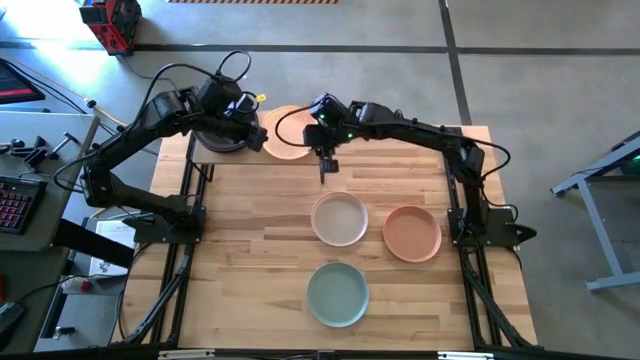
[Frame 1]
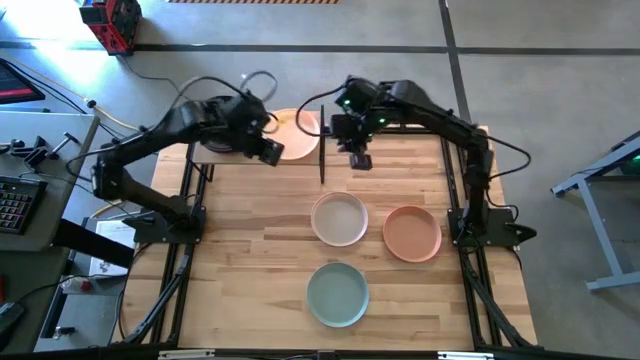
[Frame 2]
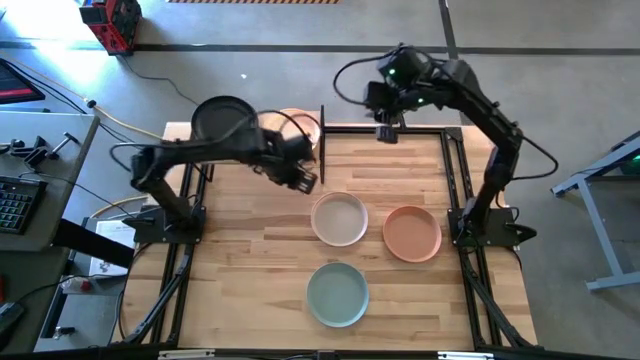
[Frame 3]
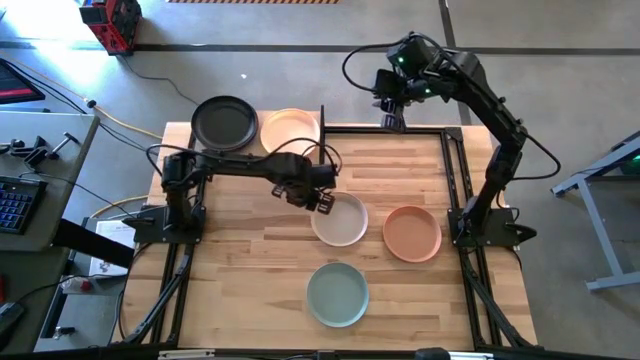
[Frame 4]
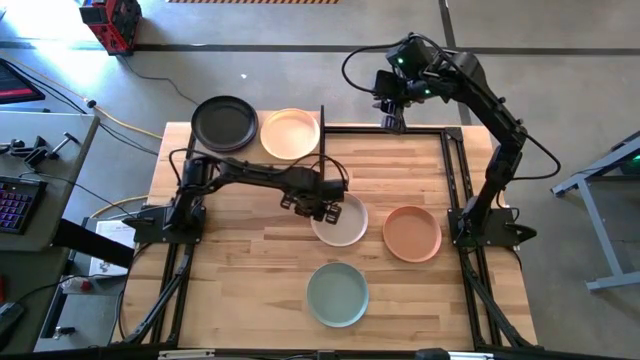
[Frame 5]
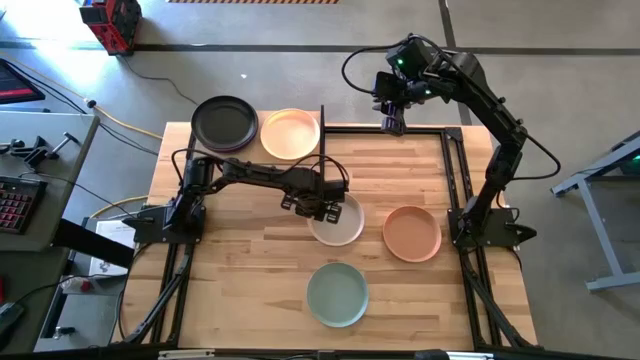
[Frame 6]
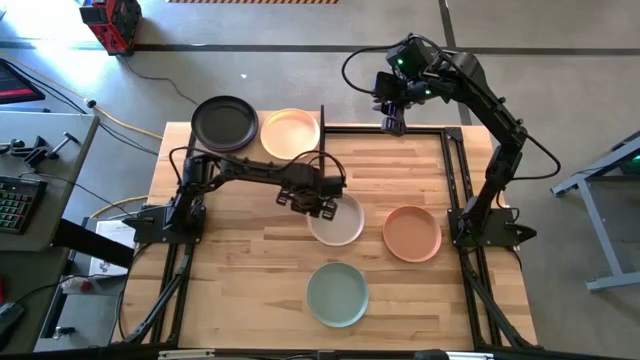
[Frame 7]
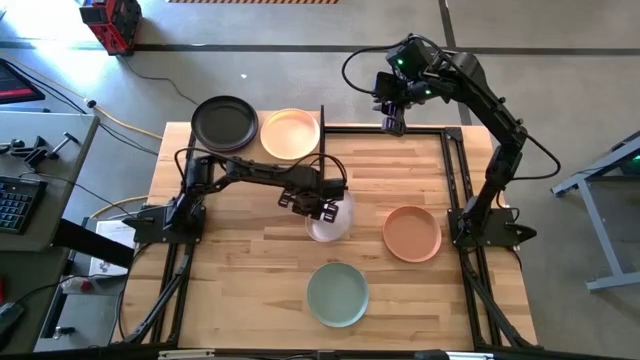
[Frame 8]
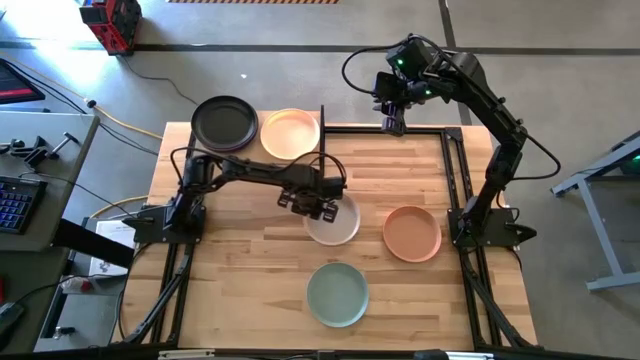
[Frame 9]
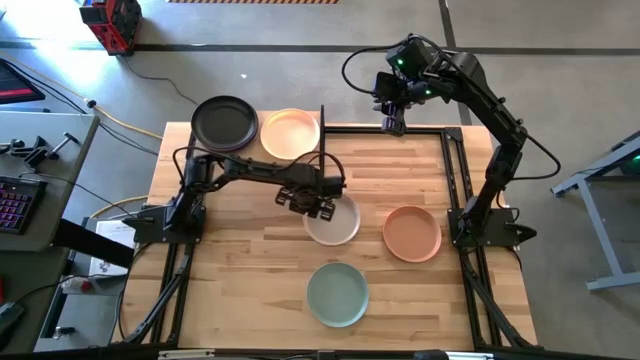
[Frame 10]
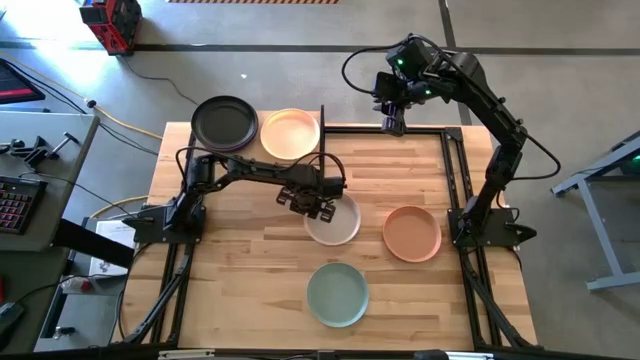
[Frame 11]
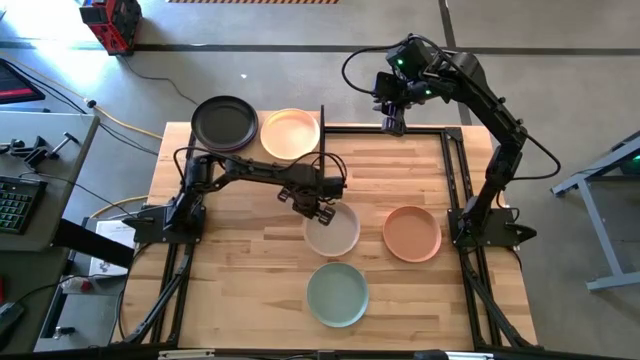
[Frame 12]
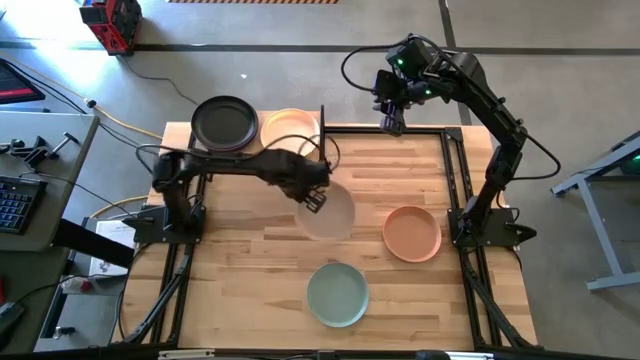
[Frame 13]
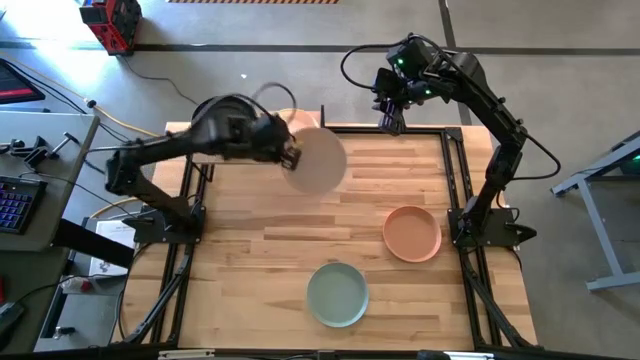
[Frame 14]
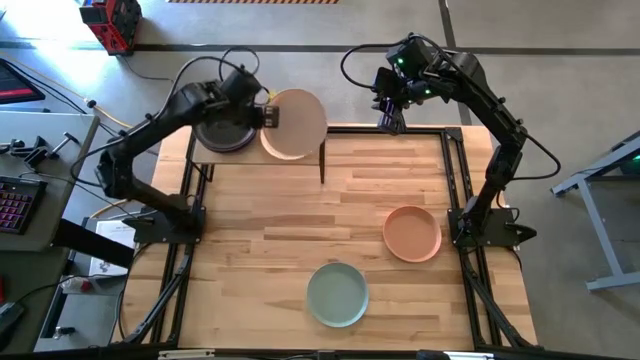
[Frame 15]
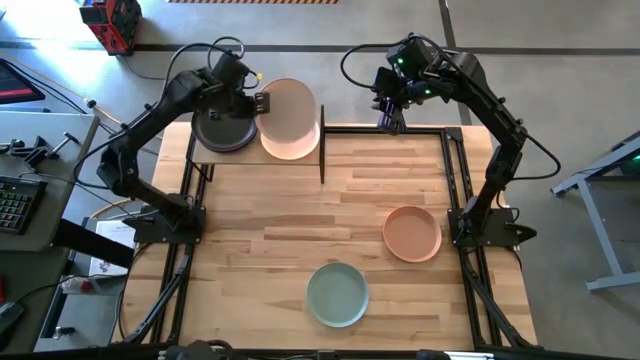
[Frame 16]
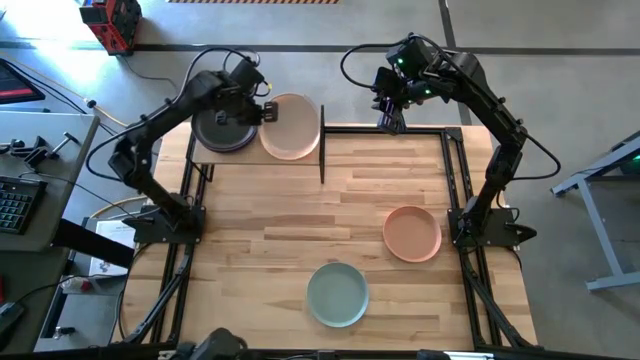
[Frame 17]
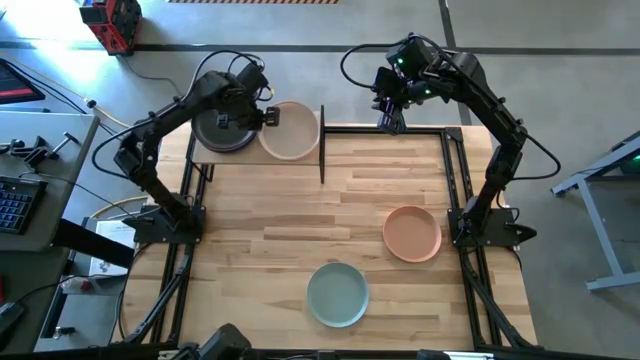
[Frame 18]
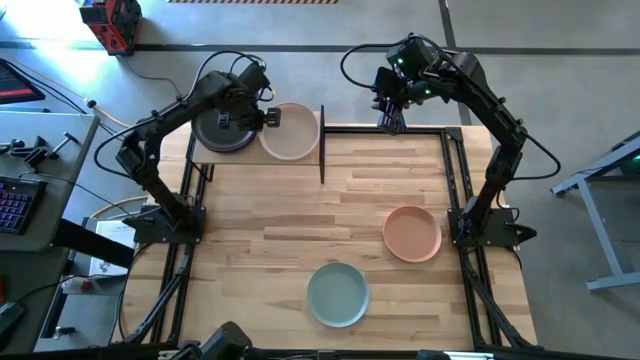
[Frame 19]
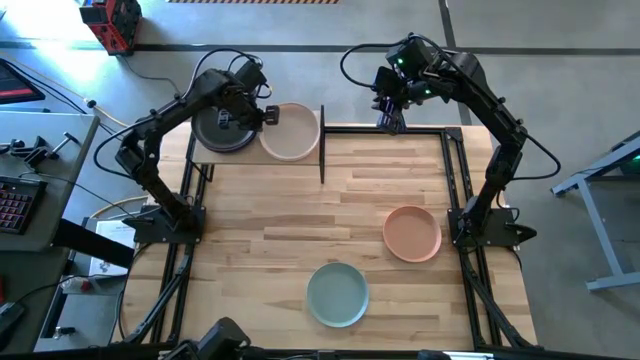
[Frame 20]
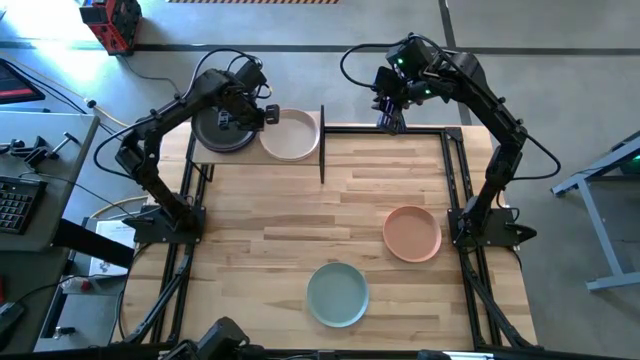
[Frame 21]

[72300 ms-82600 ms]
Task: Place and stack plates onto a shelf
Stack the white plate on top of the white plate on the shelf

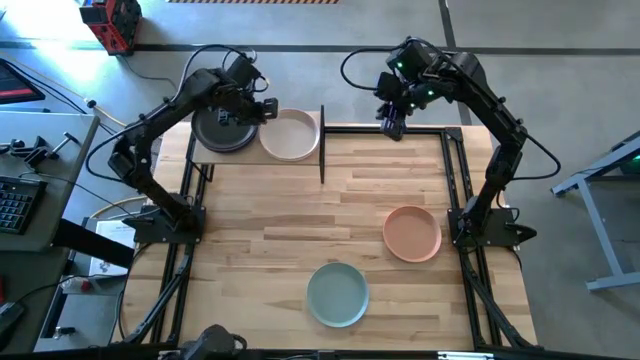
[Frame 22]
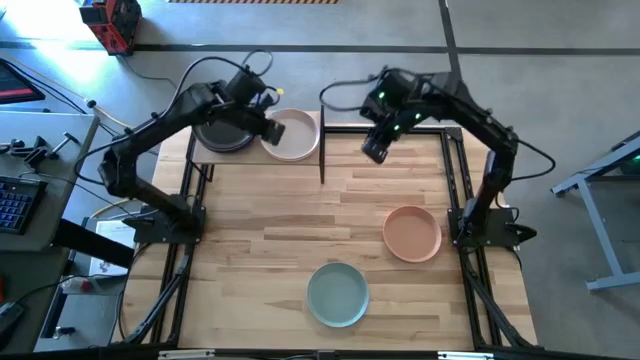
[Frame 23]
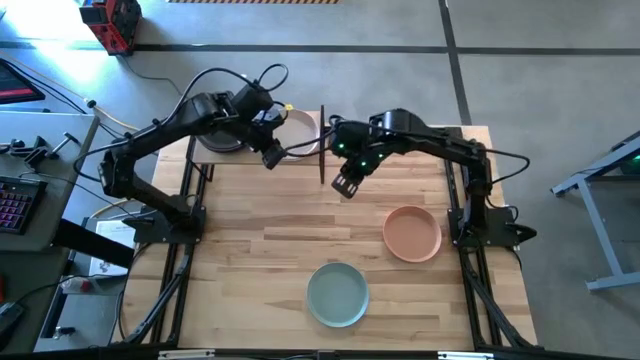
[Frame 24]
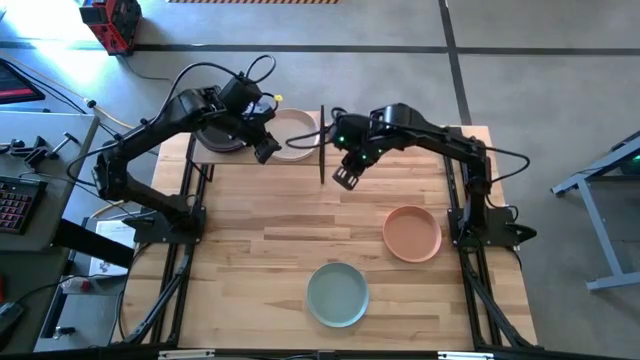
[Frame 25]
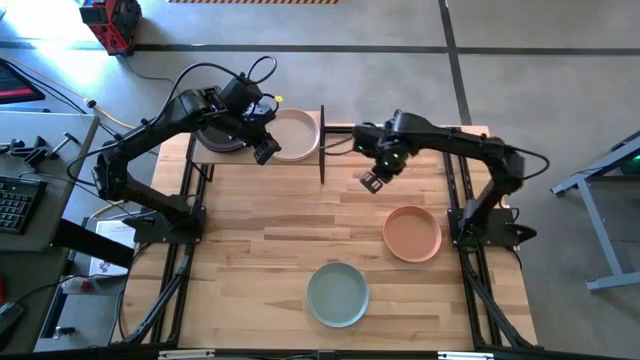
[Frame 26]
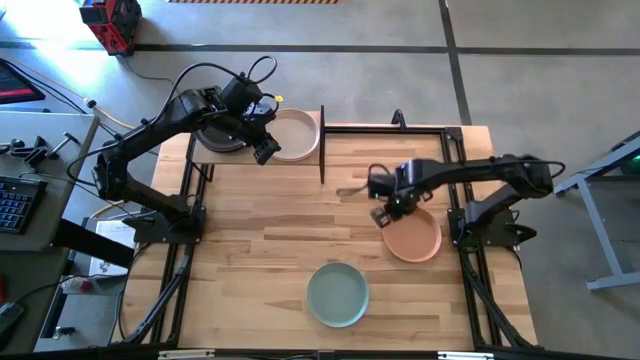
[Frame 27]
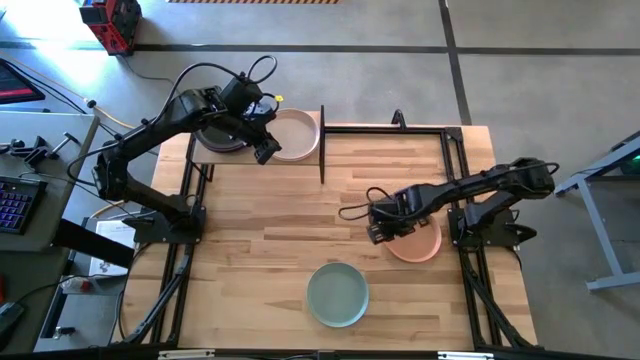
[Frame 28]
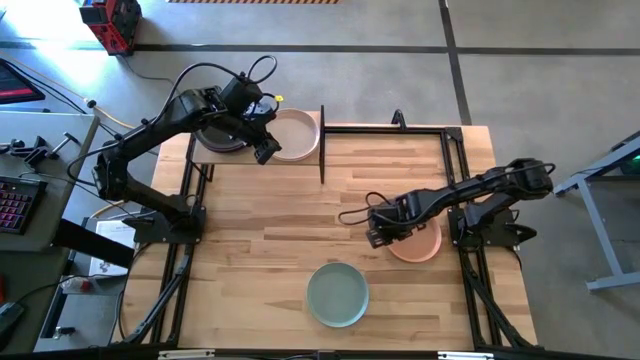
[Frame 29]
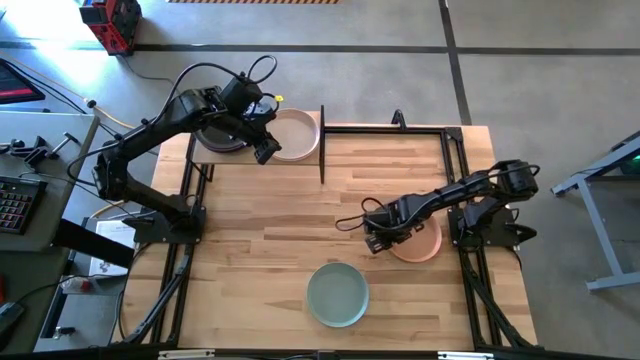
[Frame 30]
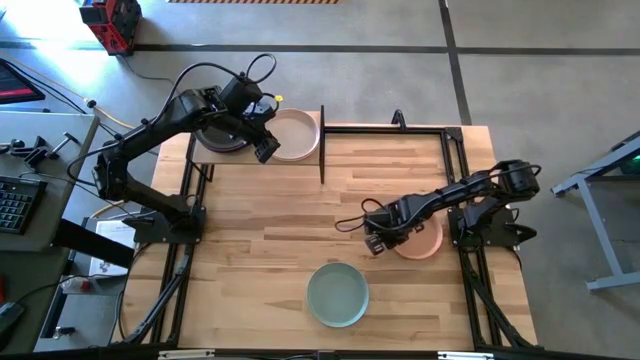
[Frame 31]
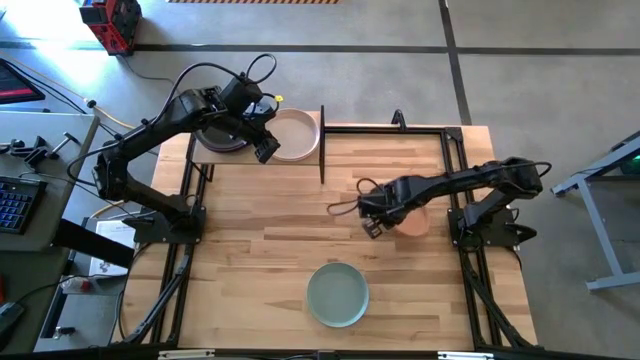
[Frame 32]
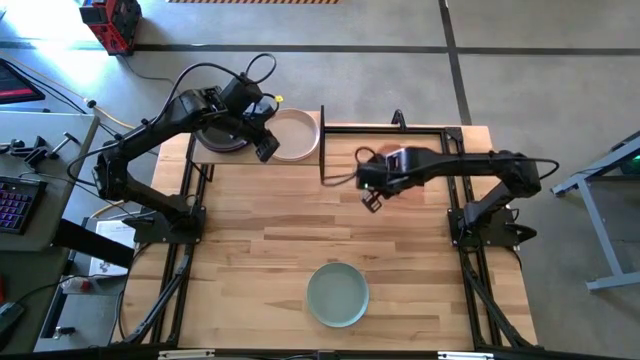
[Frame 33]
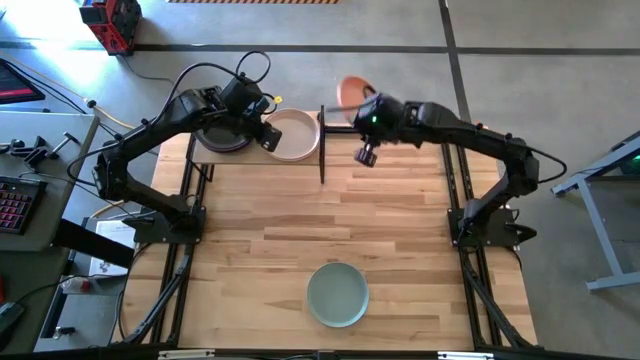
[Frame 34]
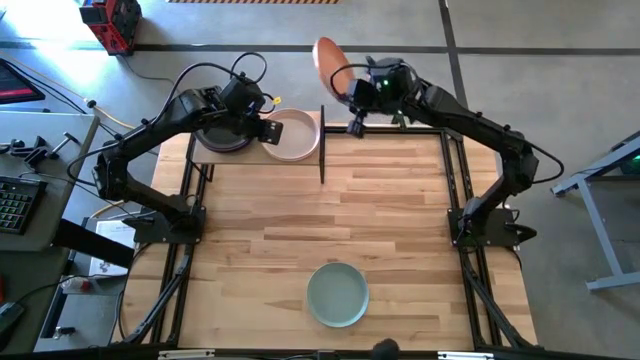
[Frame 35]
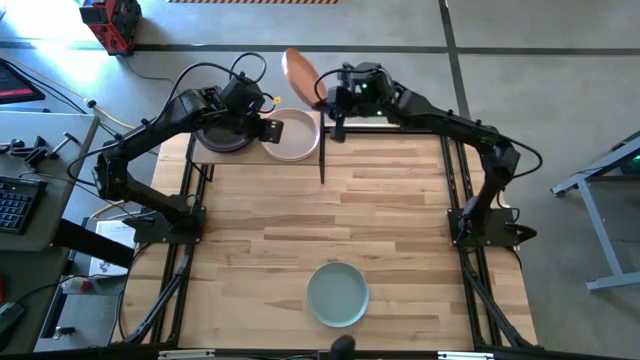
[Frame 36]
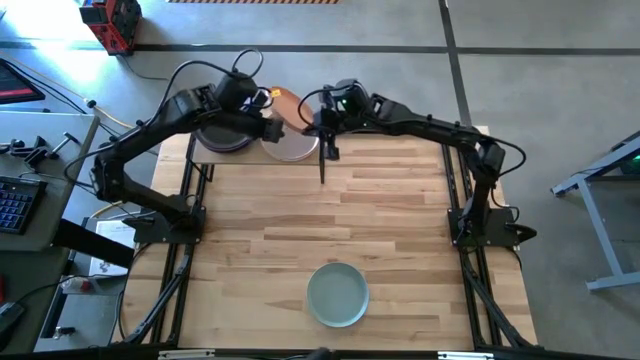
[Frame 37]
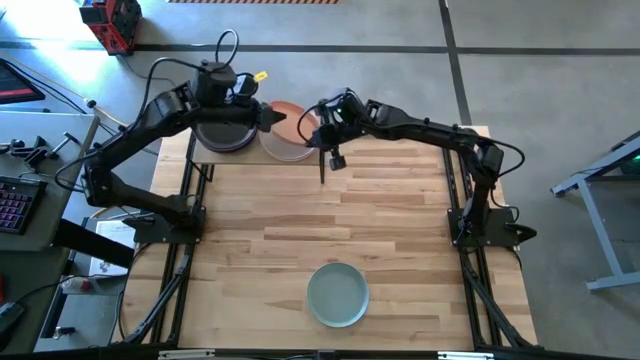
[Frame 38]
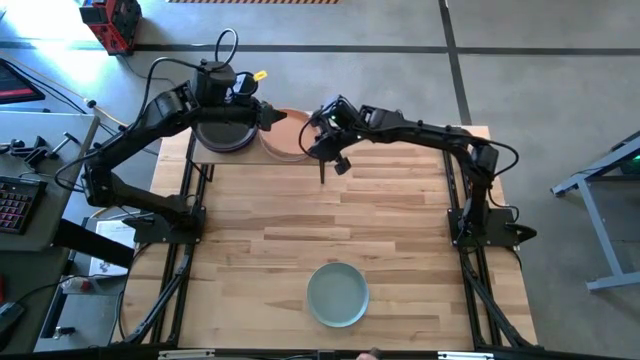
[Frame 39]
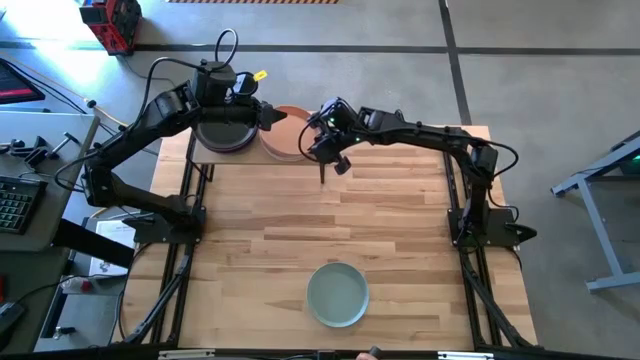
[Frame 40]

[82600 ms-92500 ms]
Stack the orange plate on top of the white plate on the shelf

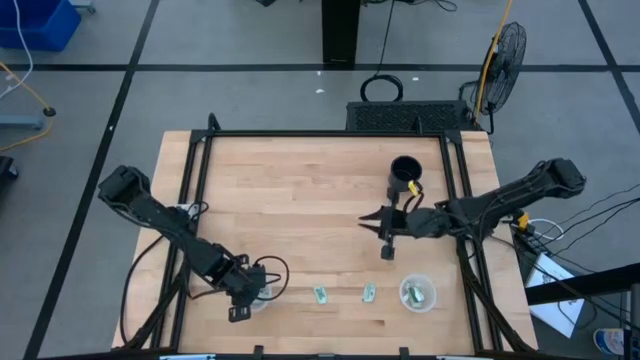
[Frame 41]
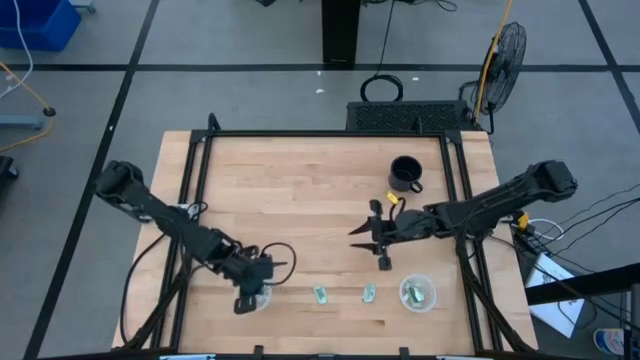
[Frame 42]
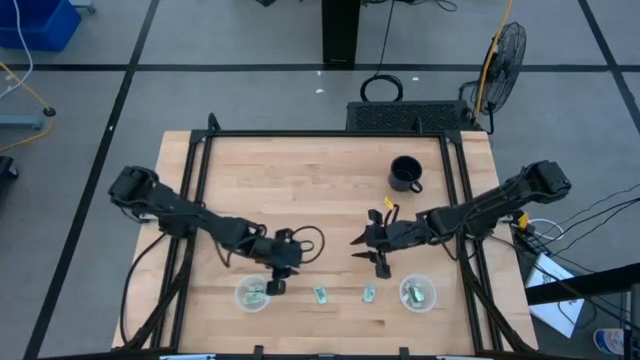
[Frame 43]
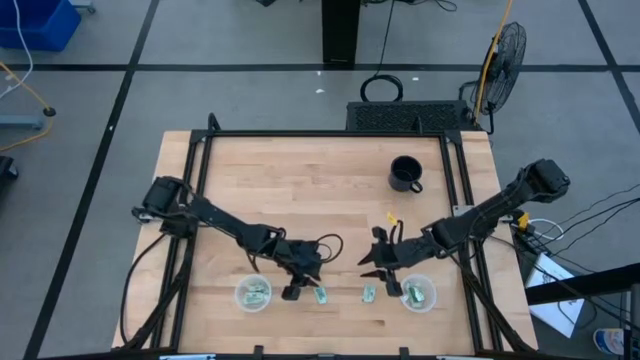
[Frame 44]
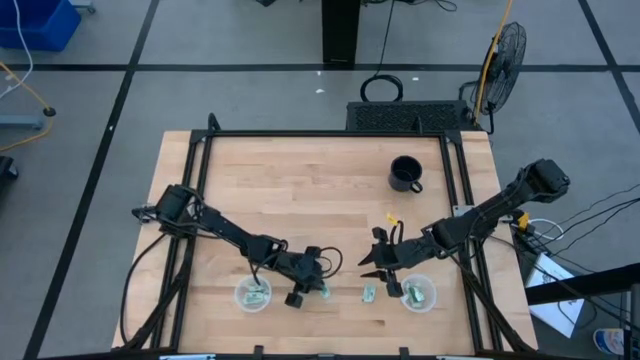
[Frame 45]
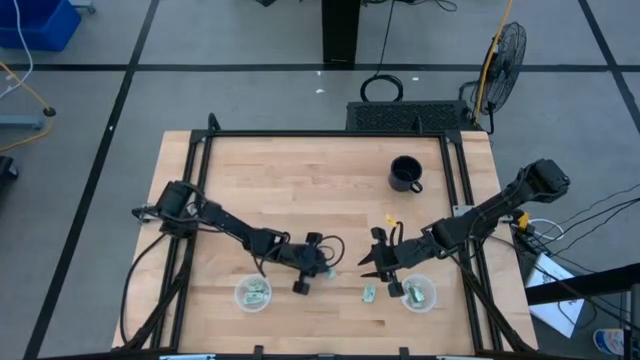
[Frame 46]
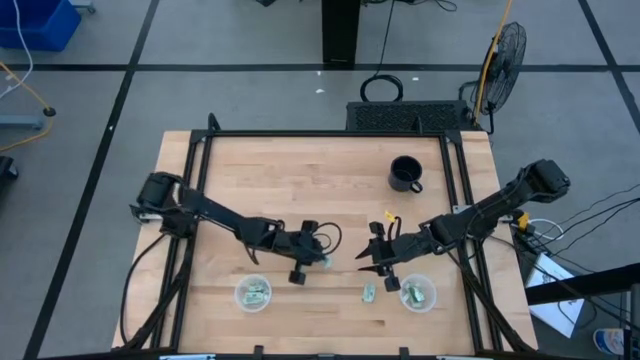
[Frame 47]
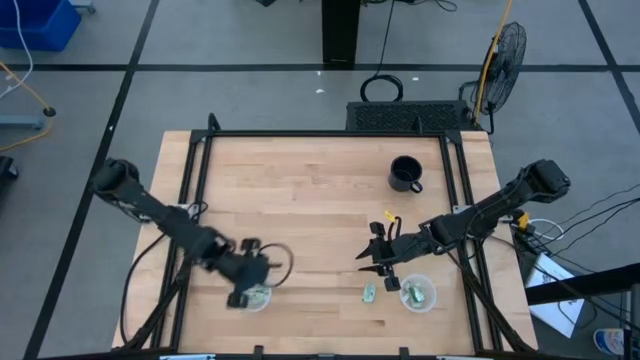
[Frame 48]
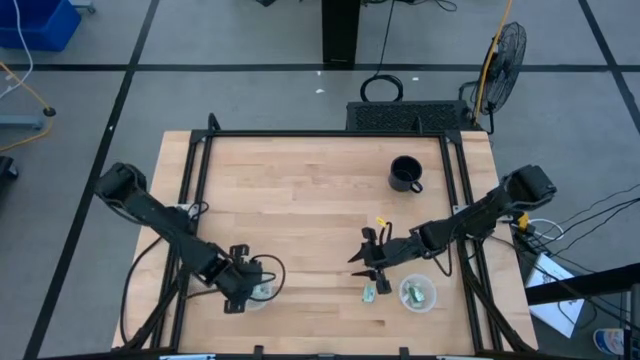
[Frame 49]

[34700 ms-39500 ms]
Task: Pick and place Stevia / Truvia into bins
Put the stevia packet into the left transparent container
